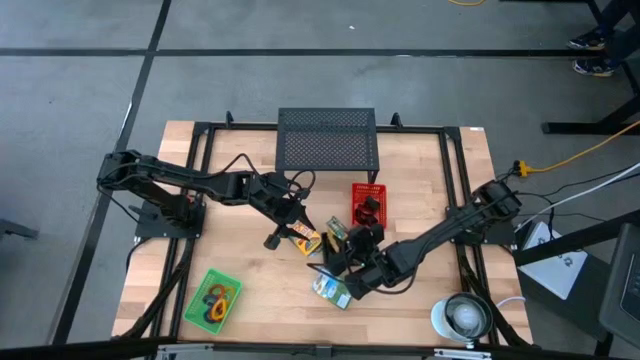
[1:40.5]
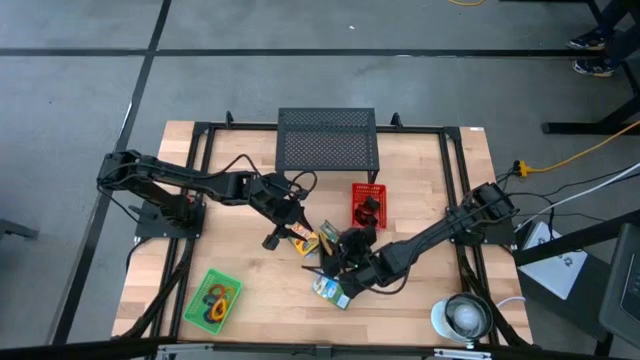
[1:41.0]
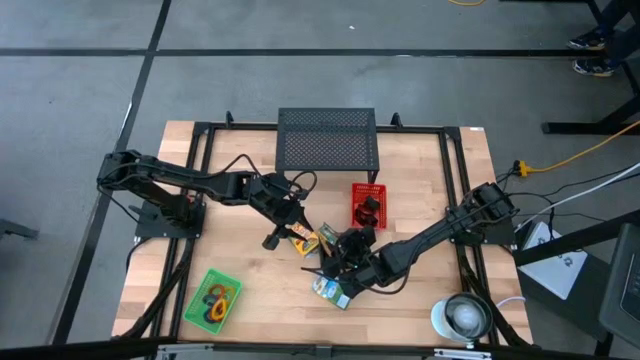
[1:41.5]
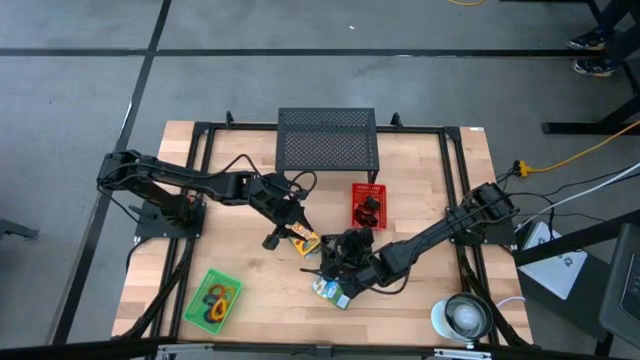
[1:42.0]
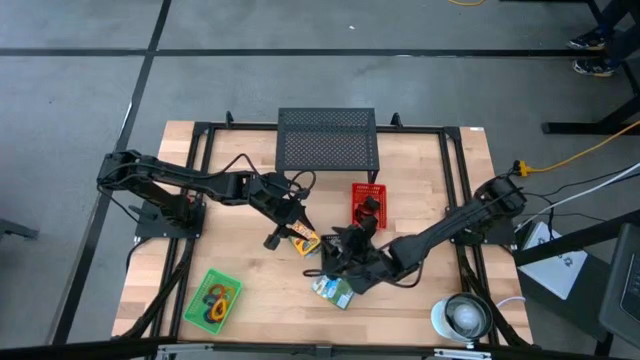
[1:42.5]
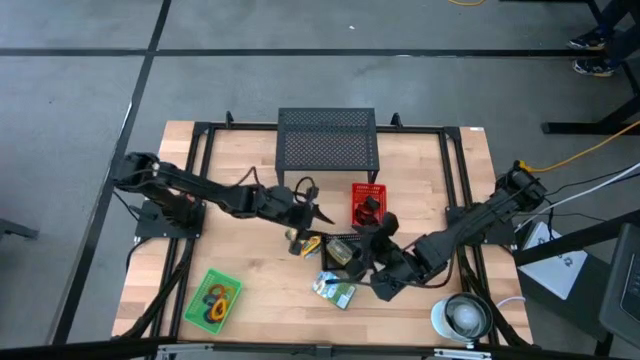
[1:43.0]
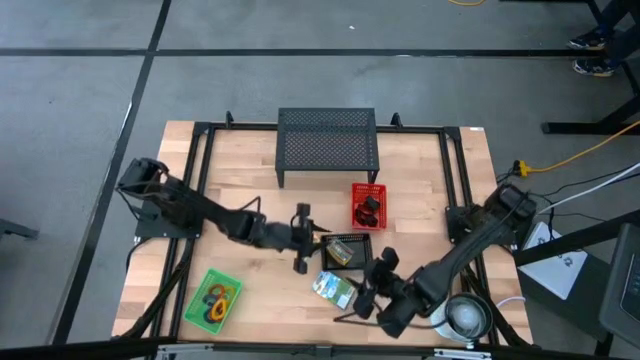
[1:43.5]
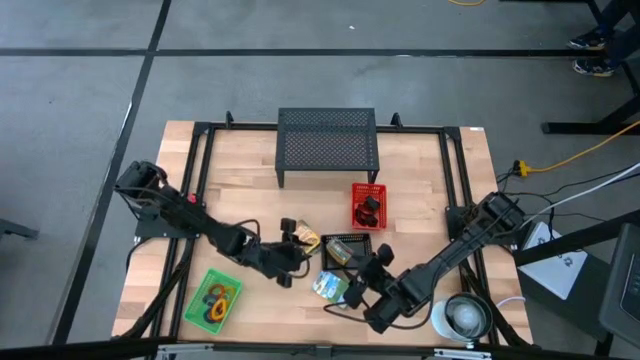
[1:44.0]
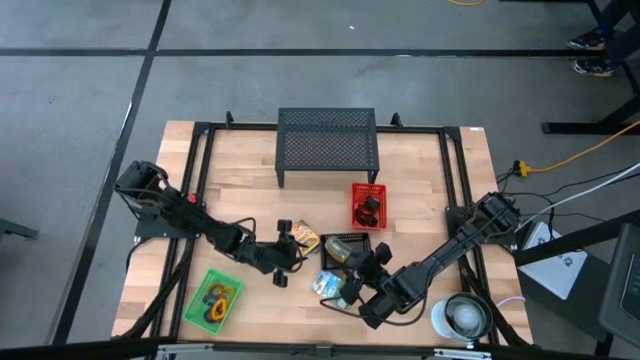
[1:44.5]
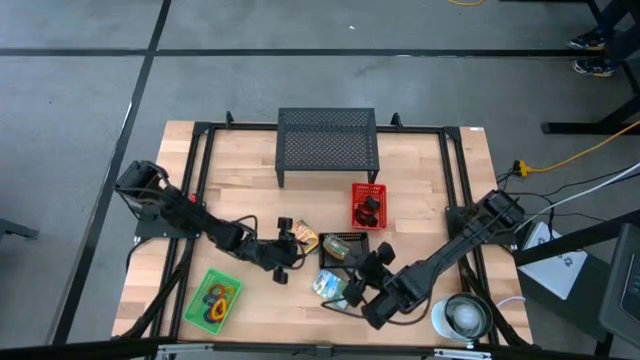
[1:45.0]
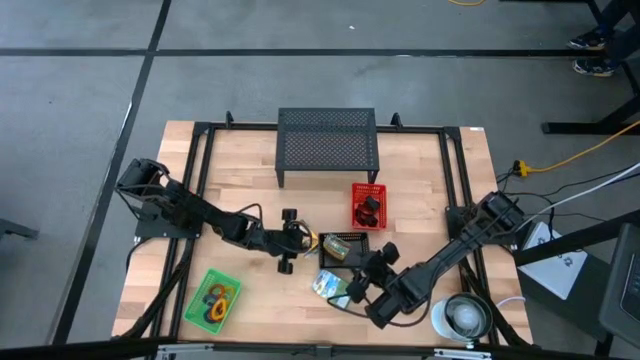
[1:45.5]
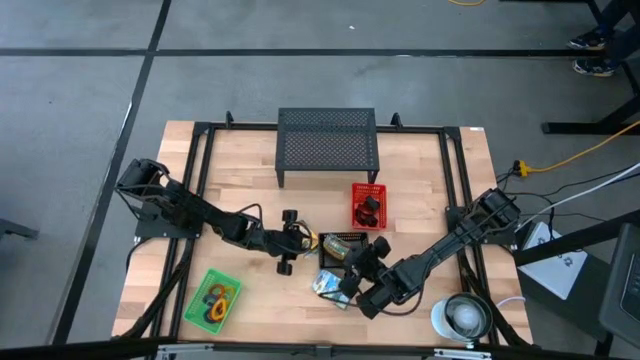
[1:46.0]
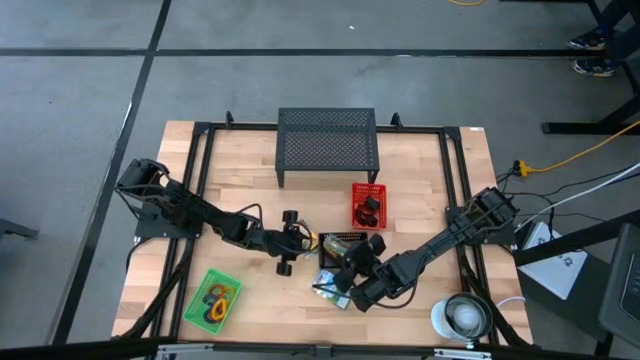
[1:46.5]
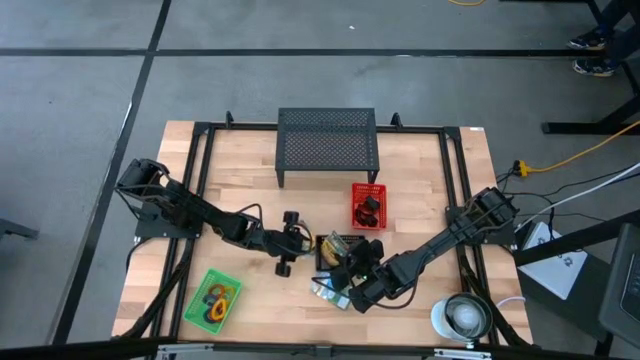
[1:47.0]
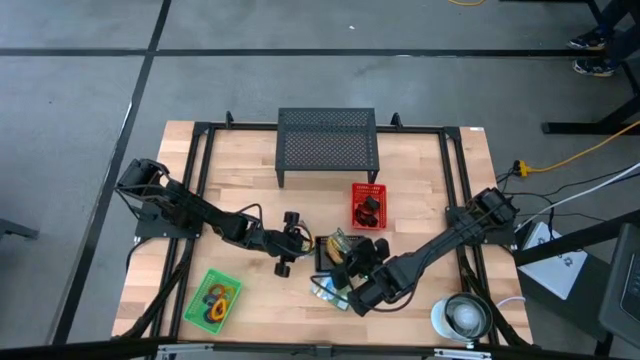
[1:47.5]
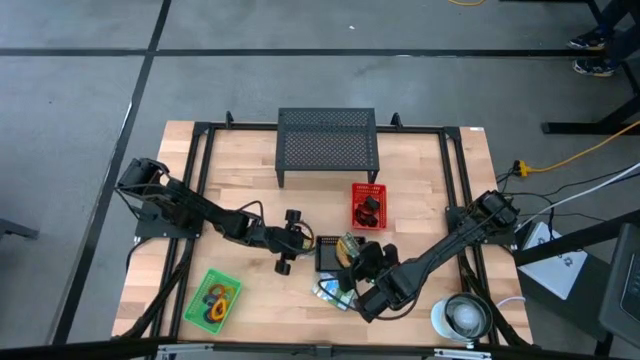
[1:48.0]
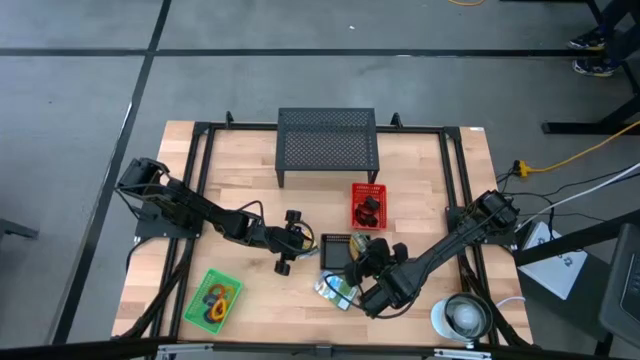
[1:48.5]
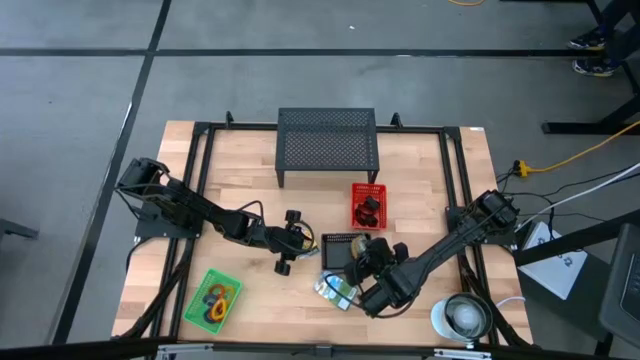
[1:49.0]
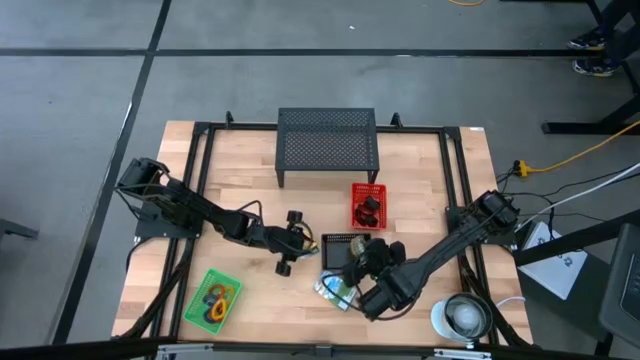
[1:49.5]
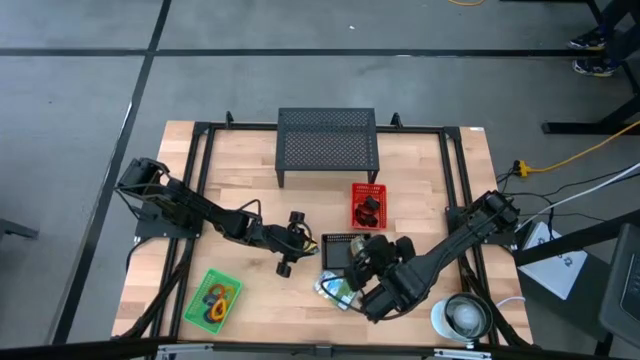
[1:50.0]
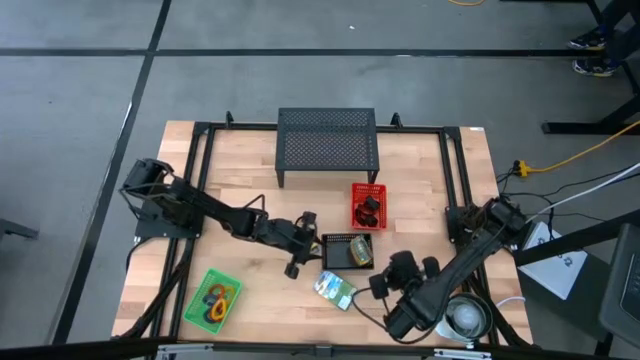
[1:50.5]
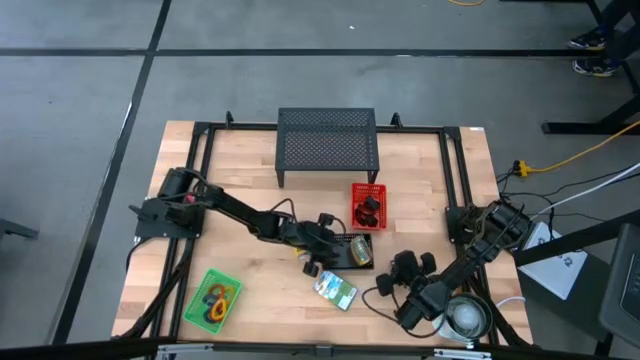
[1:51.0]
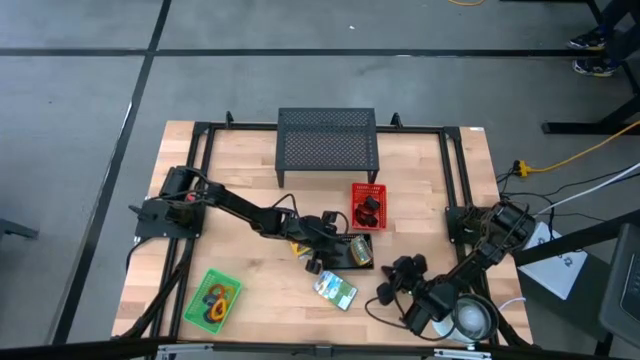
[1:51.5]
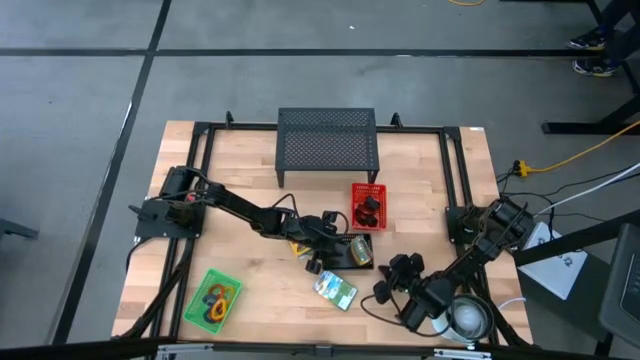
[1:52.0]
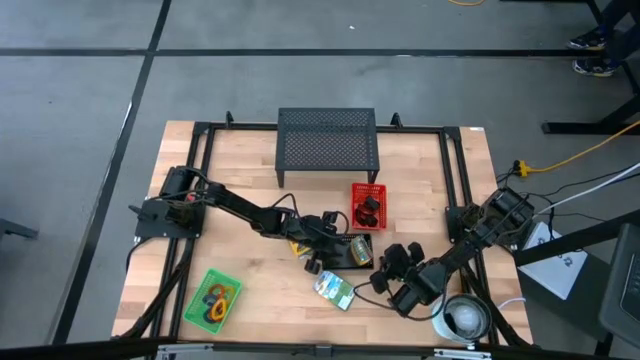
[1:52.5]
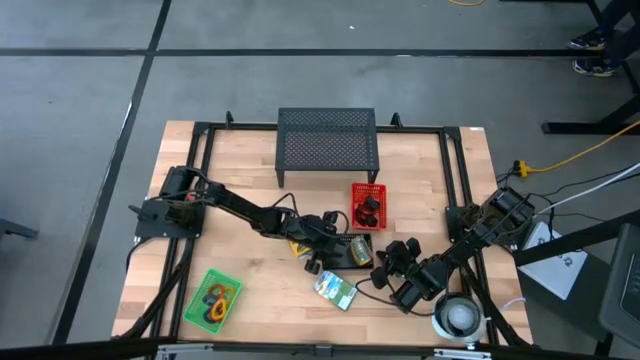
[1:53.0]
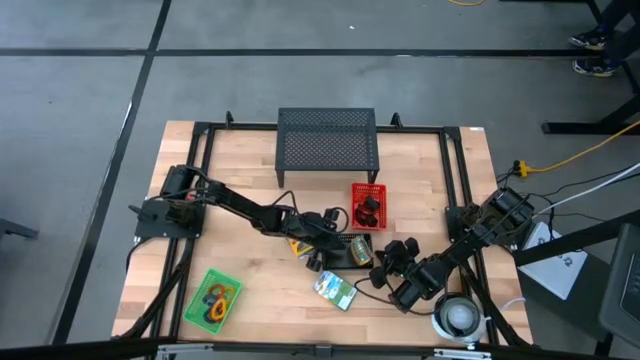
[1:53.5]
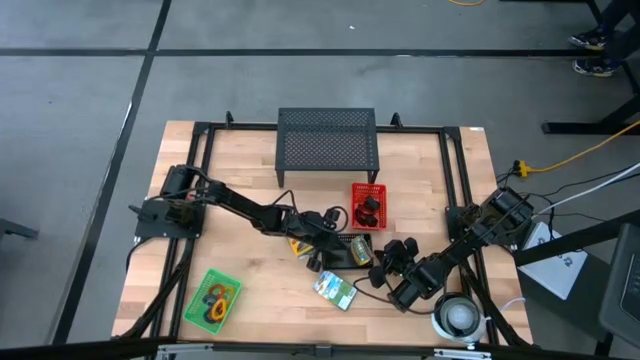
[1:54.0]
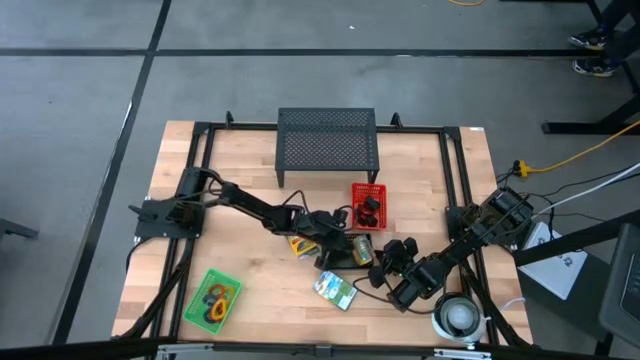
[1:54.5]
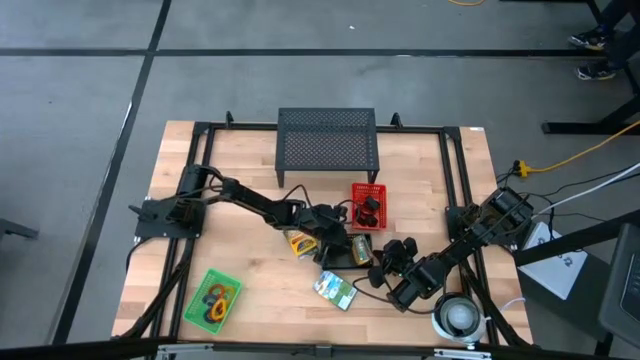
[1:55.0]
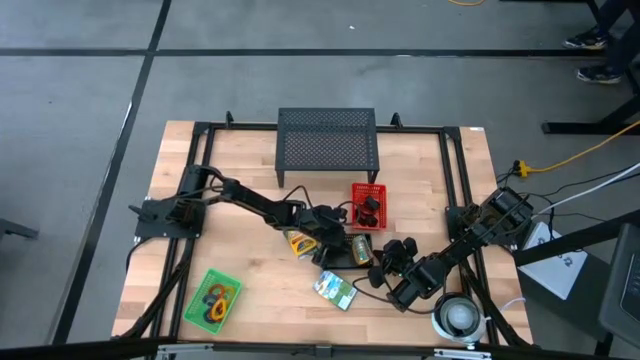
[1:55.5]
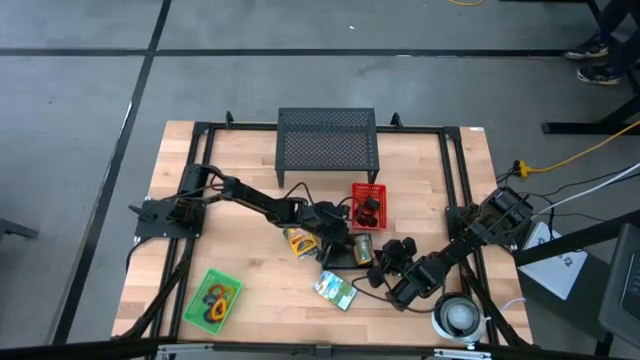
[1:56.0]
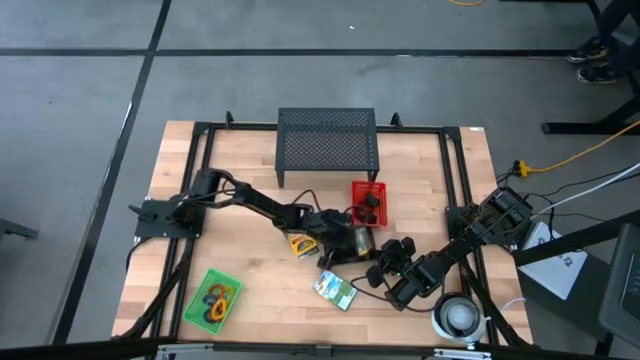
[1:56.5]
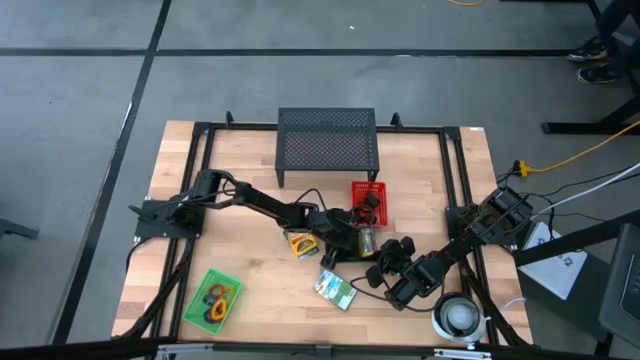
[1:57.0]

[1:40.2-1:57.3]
Task: Pick & Place Office Desk Supplies
Put the crayon box into the black bin

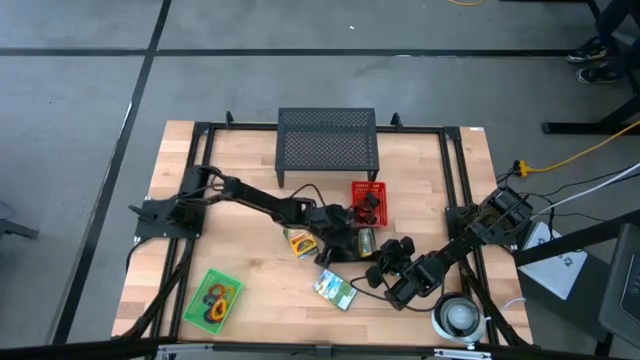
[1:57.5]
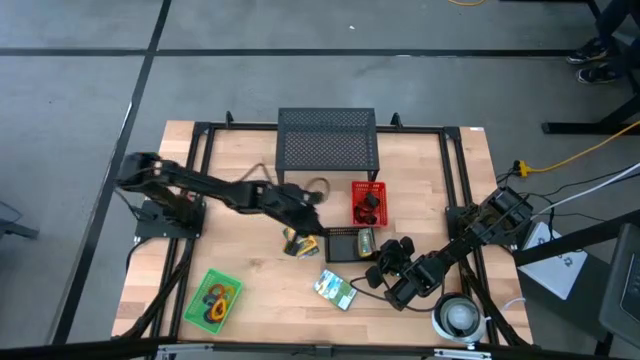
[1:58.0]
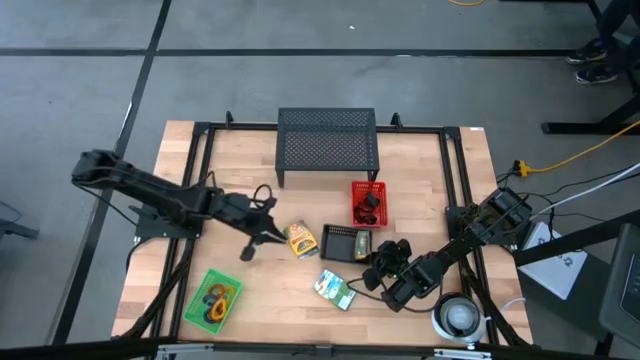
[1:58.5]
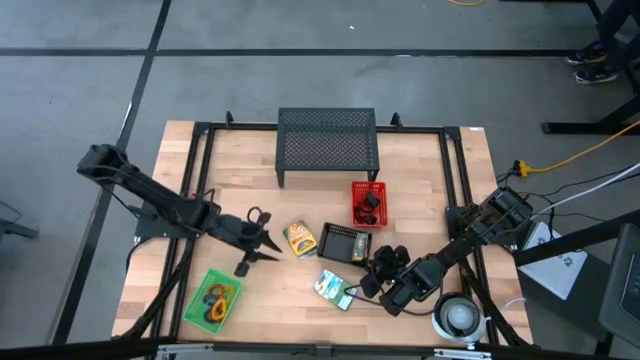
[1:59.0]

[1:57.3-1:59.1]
Adjust the black bin

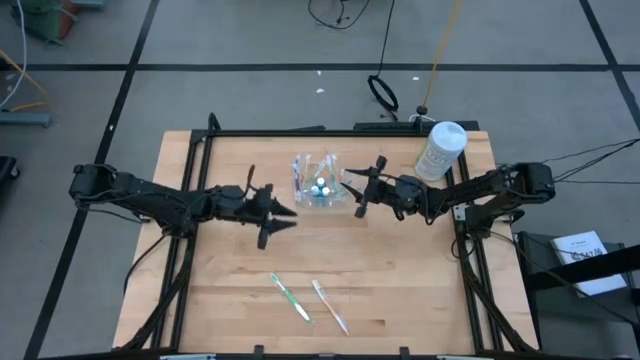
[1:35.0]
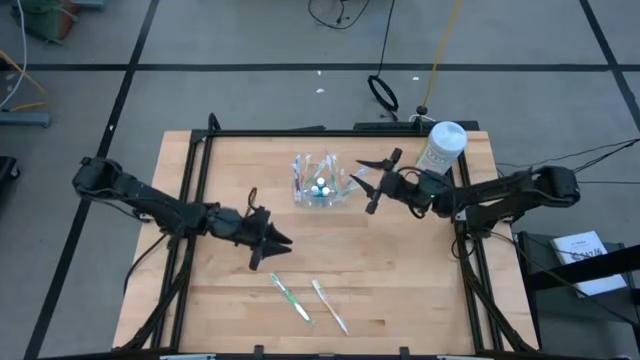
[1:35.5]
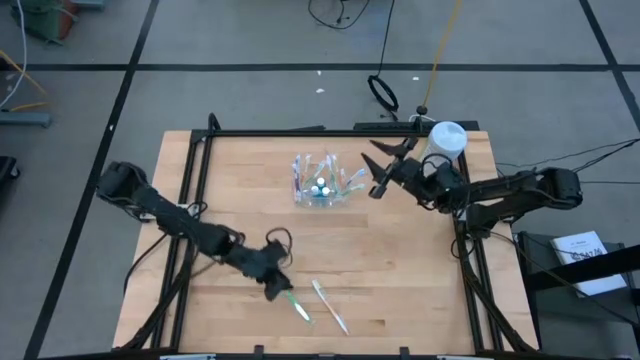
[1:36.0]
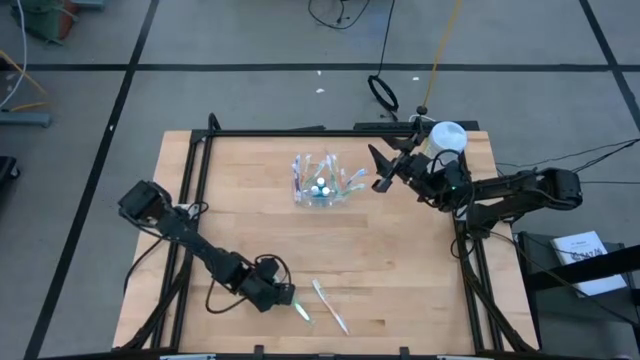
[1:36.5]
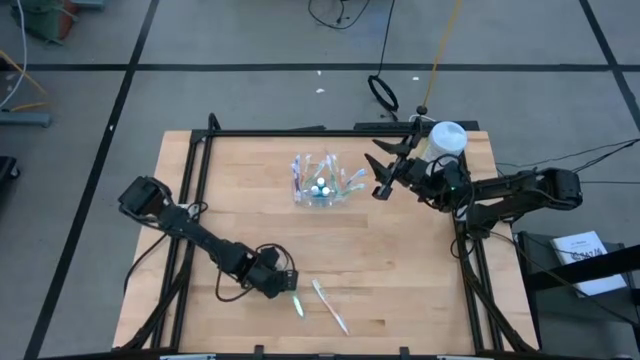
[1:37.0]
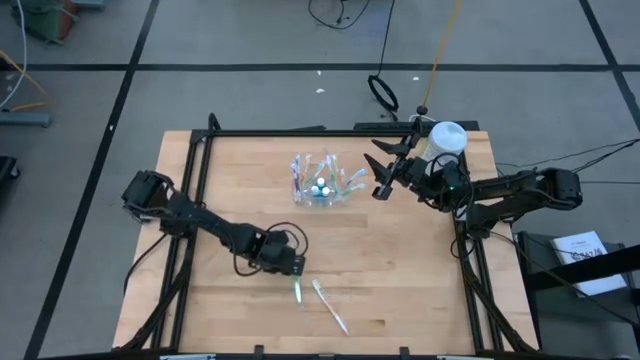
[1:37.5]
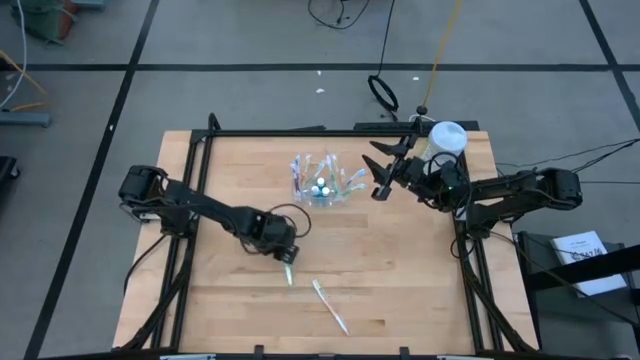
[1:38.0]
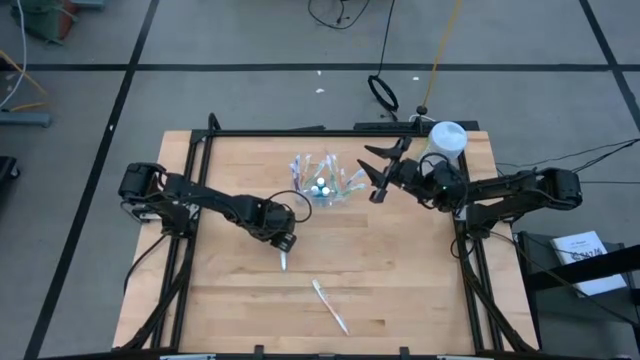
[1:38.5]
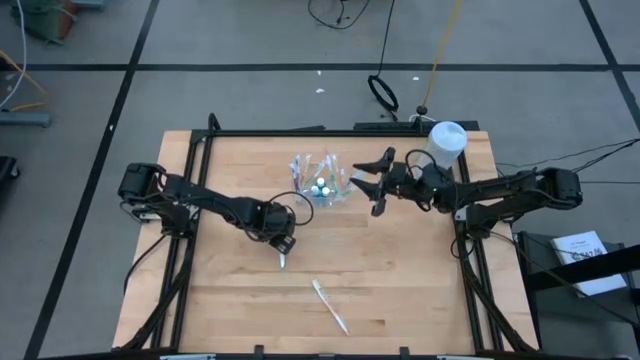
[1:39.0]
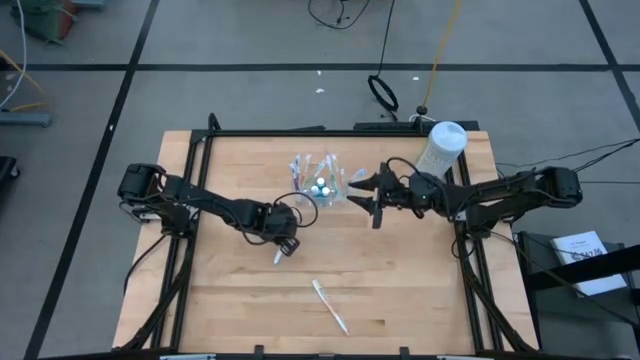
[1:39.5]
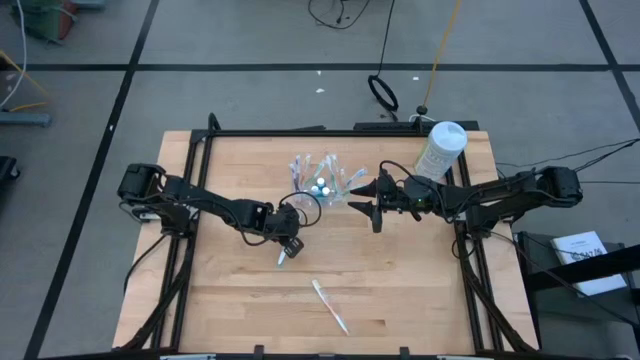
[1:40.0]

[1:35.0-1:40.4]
Task: Pick & Place Toothbrushes
Put the green toothbrush into the transparent organizer
